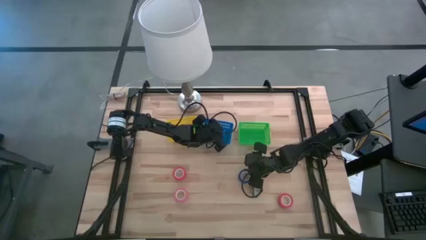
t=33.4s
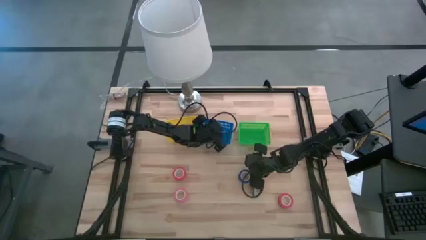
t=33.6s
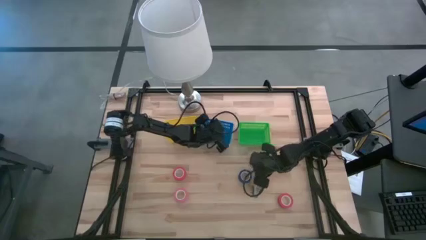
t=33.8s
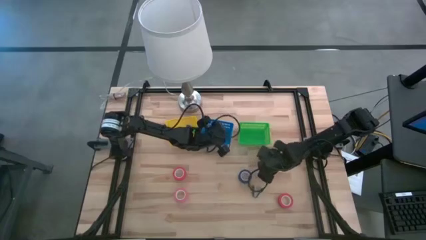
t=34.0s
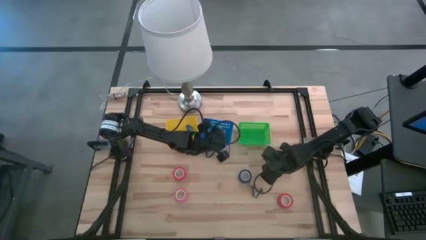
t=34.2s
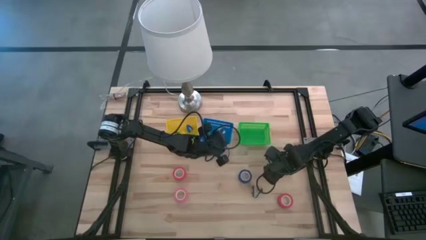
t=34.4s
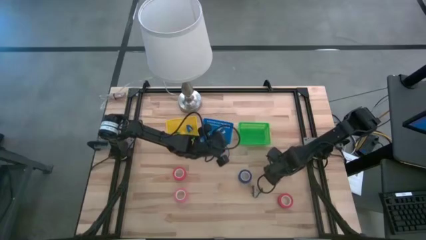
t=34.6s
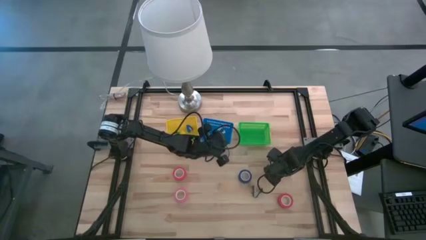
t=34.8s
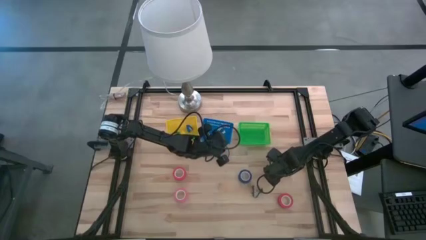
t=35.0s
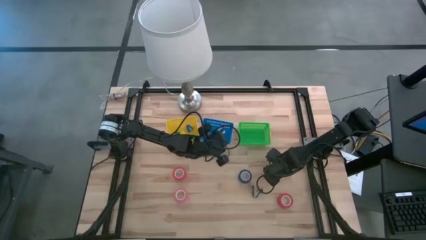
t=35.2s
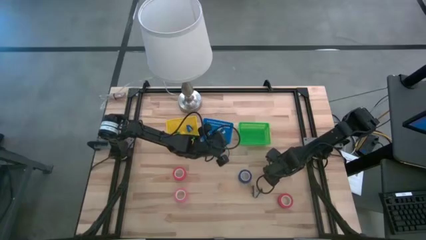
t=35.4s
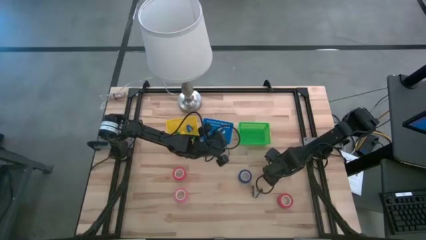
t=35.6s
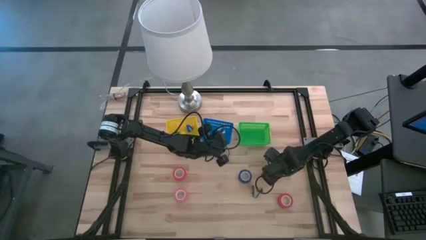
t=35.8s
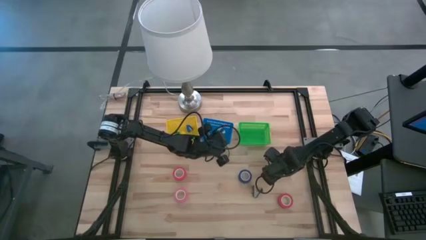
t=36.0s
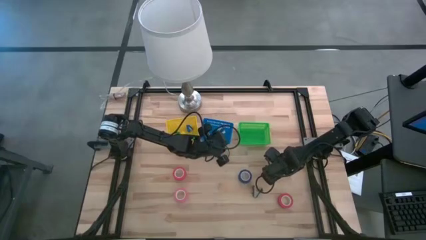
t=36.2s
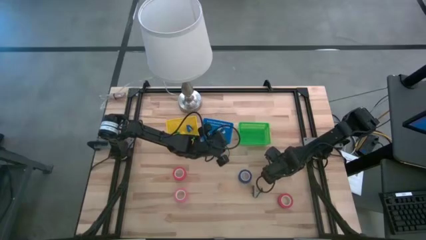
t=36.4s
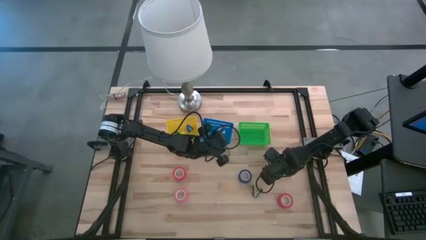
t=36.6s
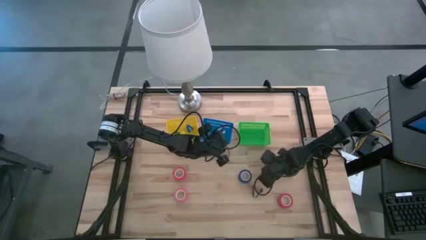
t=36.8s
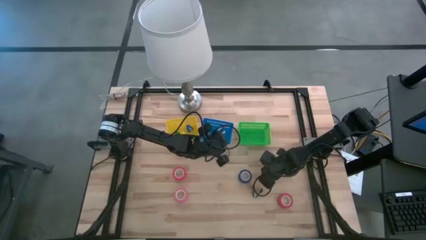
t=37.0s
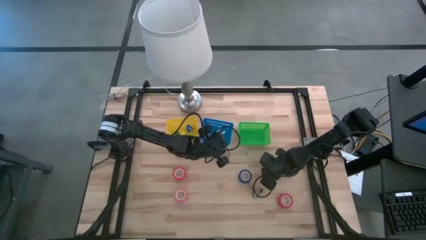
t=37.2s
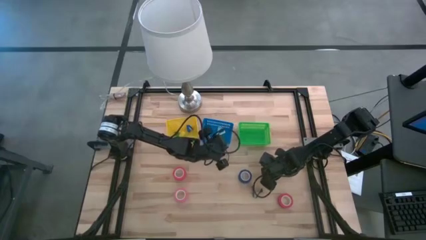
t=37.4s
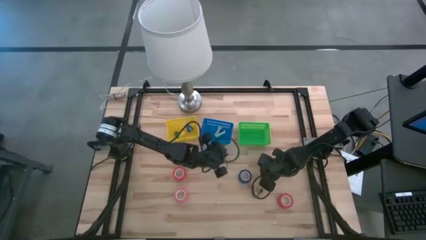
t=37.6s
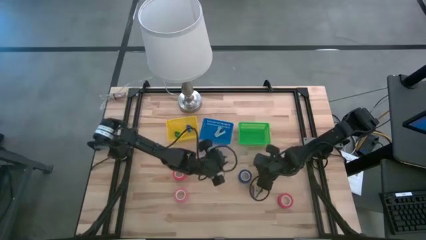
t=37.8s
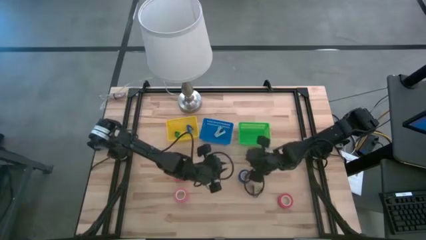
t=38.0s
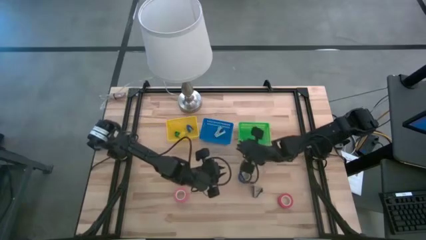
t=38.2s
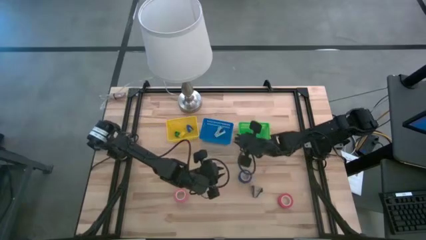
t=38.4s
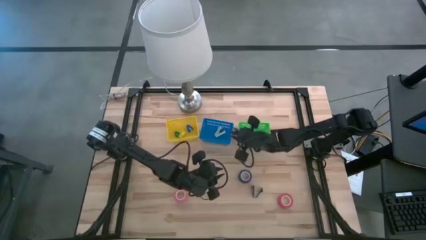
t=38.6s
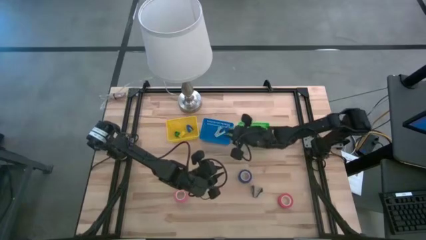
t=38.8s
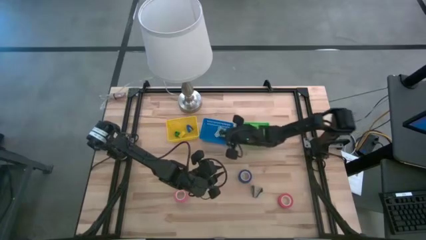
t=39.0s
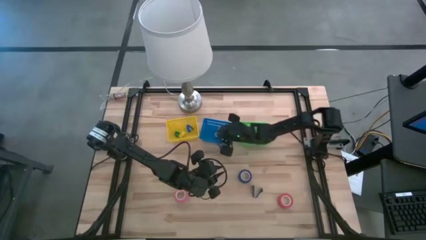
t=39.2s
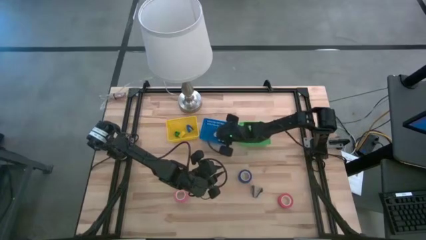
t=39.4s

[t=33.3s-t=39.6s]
Task: Pick and place Stapler, Stapler remover, tape
Put the blue staple remover into the blue bin

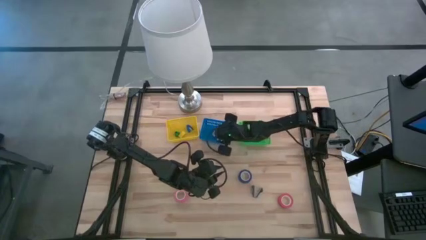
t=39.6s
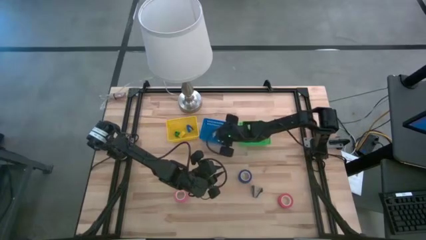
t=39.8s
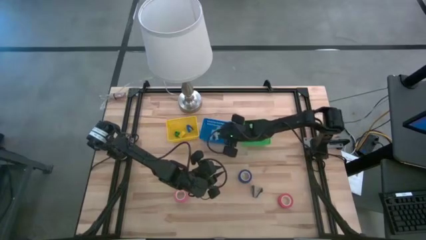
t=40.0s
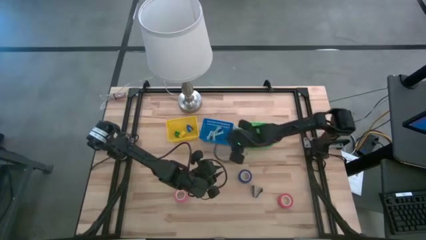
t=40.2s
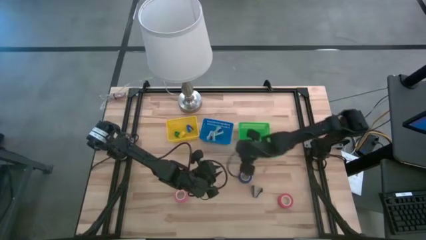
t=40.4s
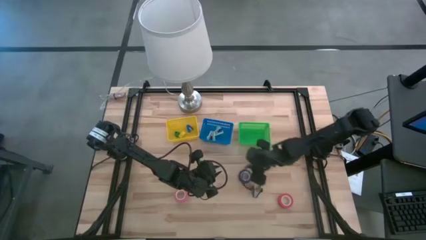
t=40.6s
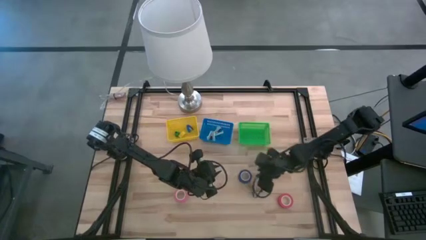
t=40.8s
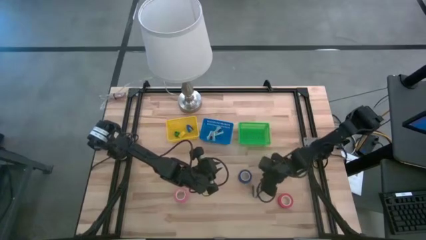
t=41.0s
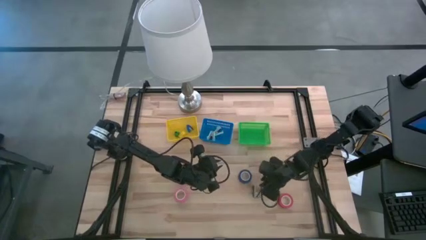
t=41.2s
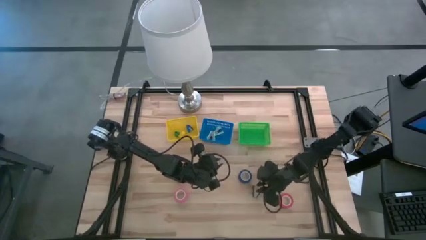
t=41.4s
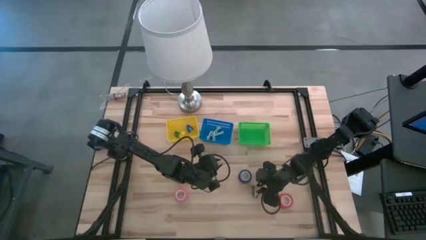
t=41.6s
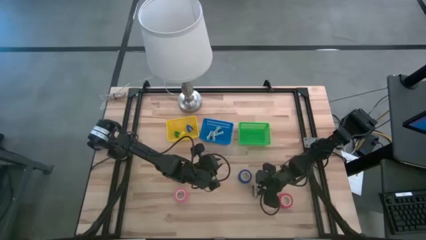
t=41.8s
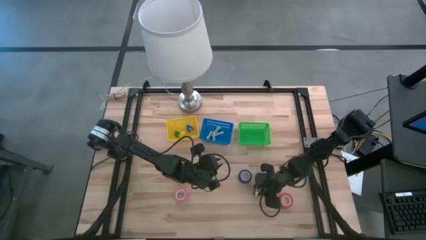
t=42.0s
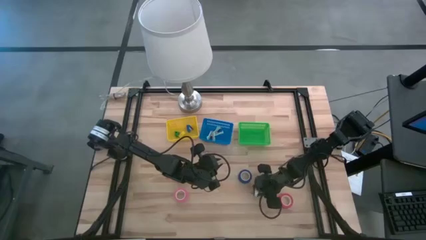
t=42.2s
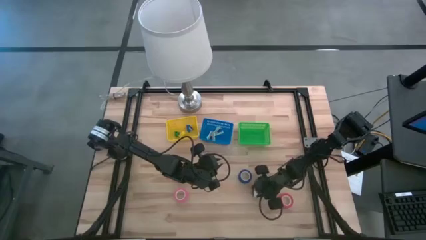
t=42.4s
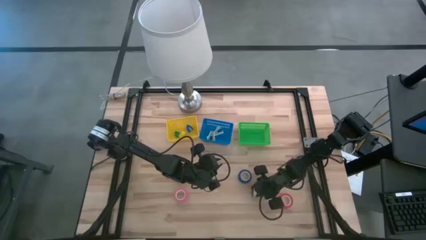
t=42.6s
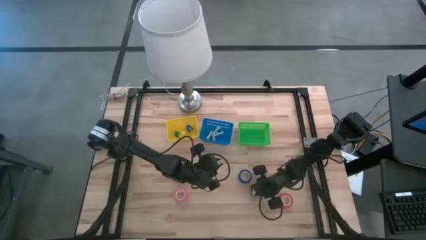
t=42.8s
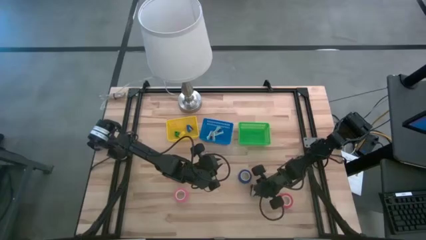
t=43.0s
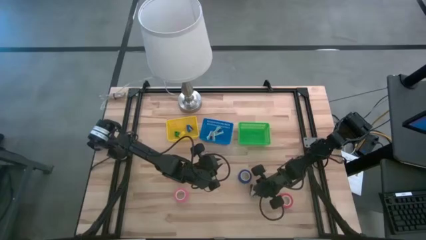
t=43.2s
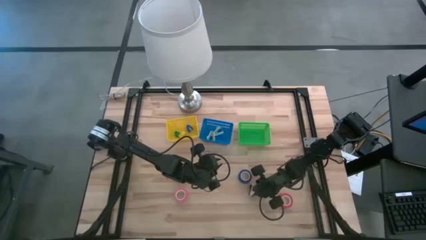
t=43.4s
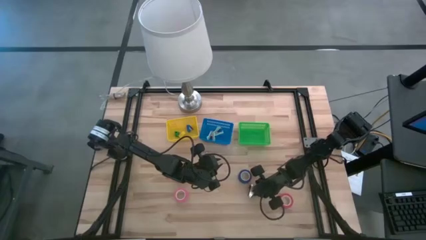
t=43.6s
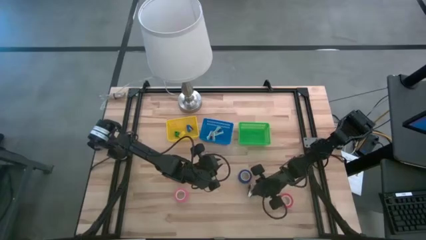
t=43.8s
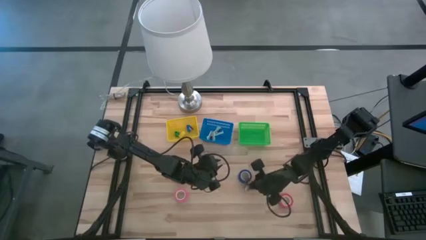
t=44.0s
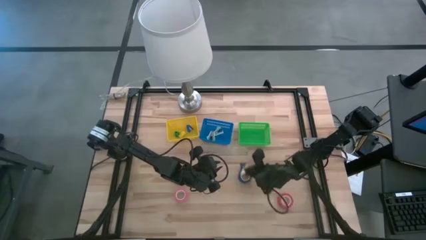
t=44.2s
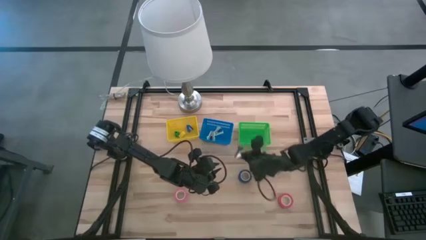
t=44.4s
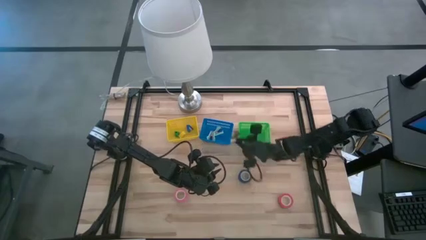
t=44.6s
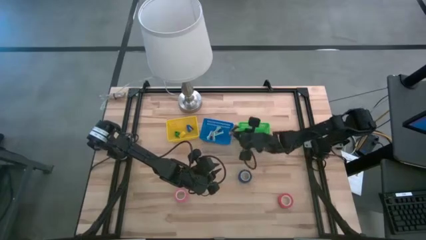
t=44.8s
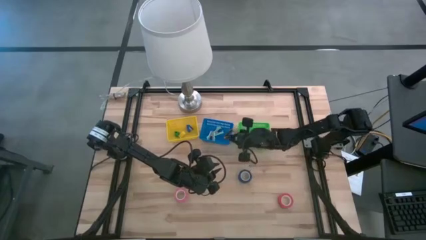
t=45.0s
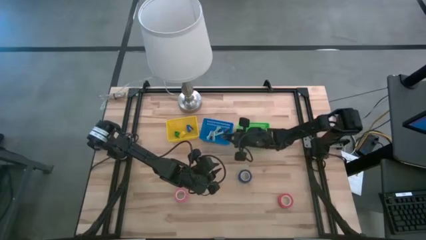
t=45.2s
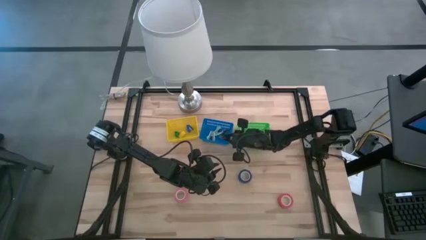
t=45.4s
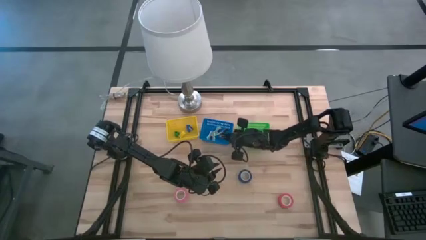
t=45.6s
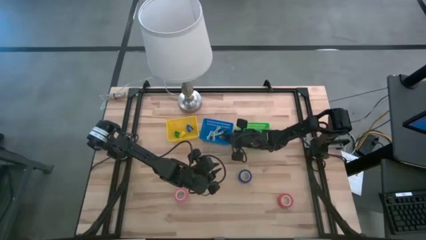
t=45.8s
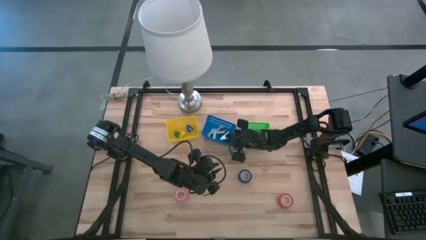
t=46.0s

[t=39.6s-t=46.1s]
Put the black staple remover into the blue bin

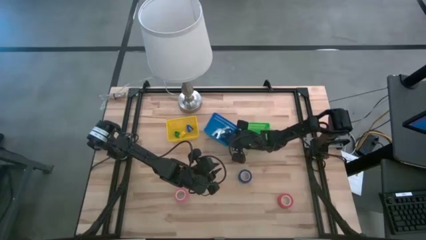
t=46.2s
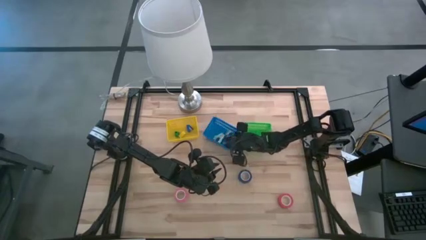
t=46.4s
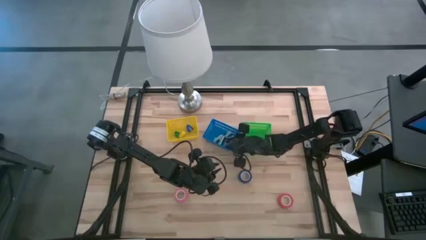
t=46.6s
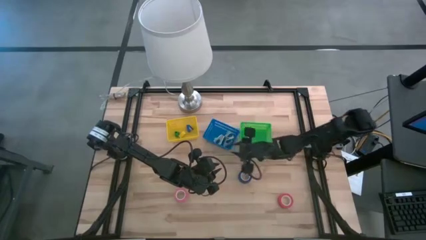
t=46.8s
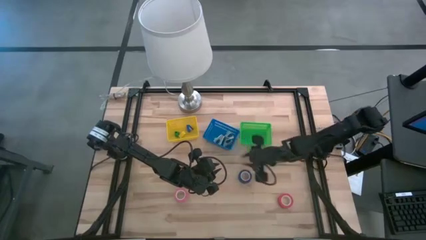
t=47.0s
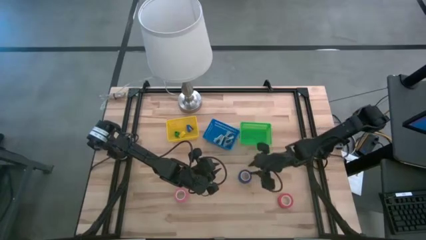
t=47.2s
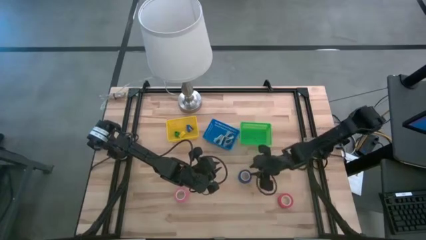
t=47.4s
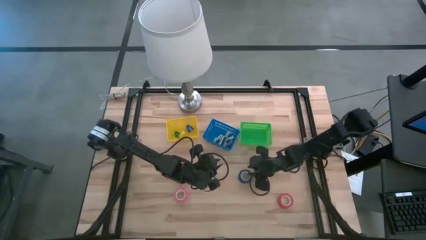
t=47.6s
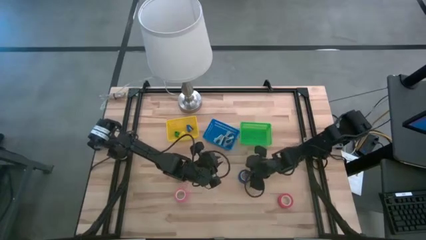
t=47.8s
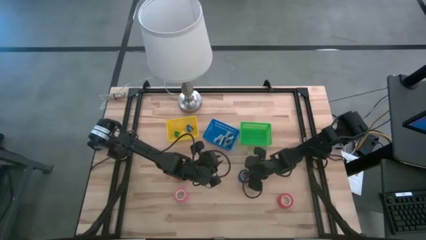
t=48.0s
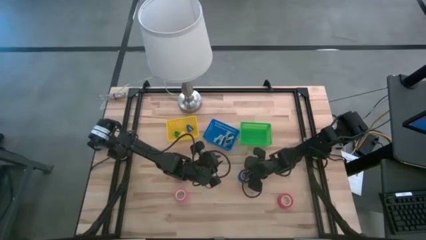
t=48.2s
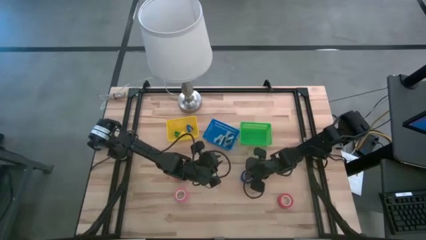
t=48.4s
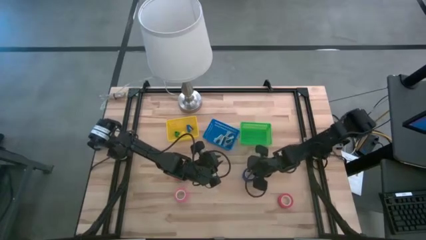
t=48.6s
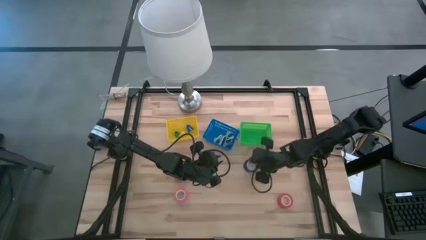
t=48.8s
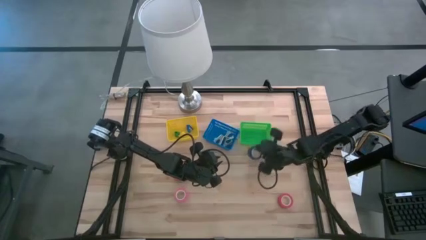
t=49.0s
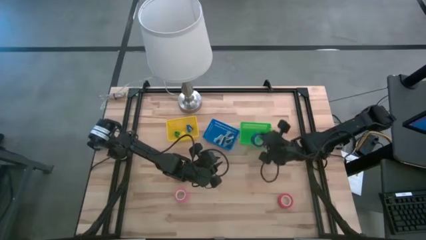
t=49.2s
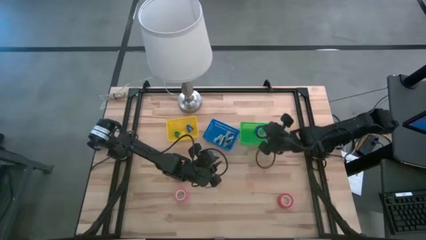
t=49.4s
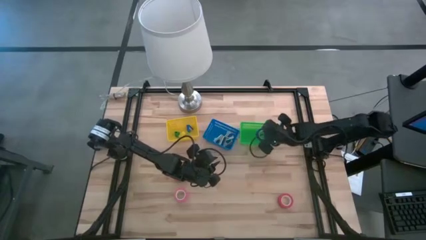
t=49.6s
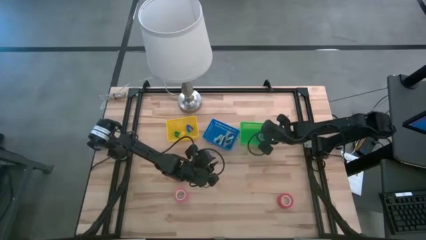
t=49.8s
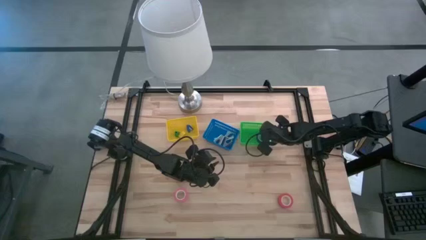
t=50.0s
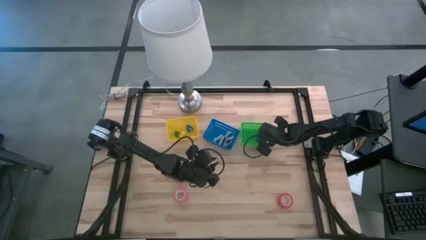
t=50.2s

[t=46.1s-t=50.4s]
Put the blue tape into the green bin
